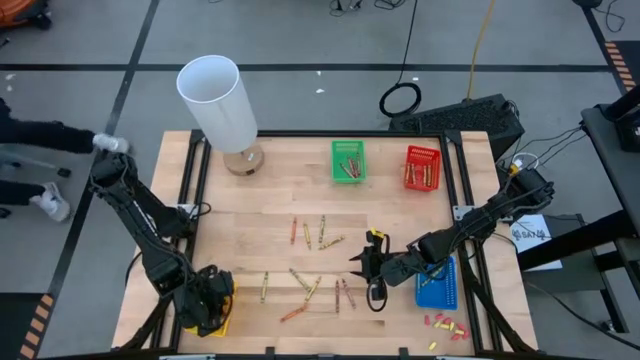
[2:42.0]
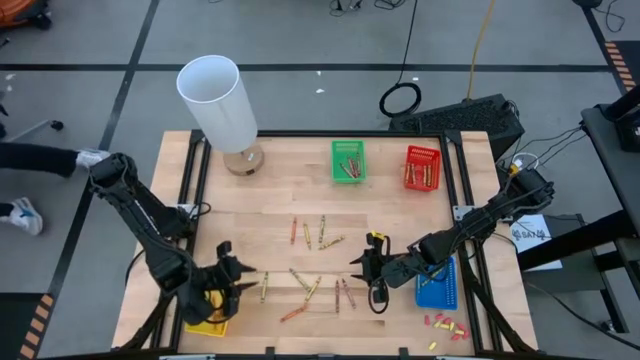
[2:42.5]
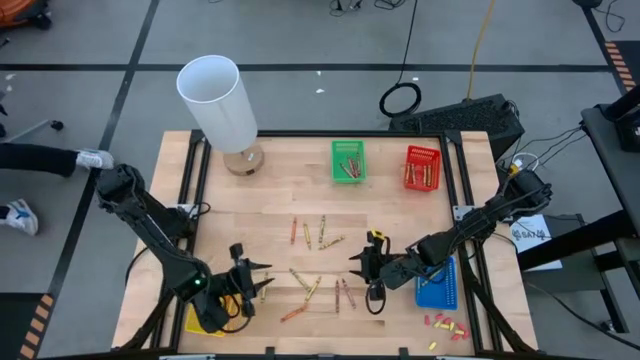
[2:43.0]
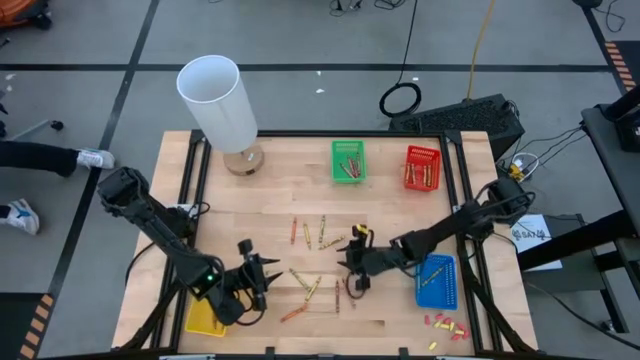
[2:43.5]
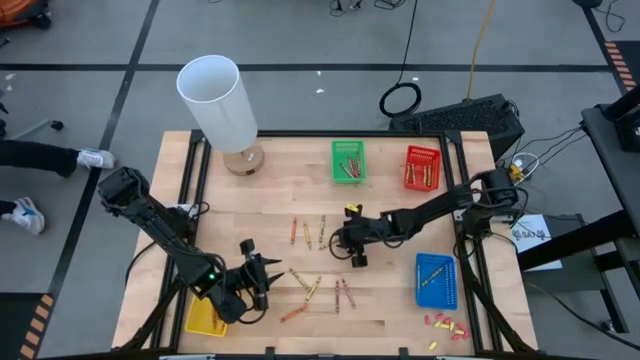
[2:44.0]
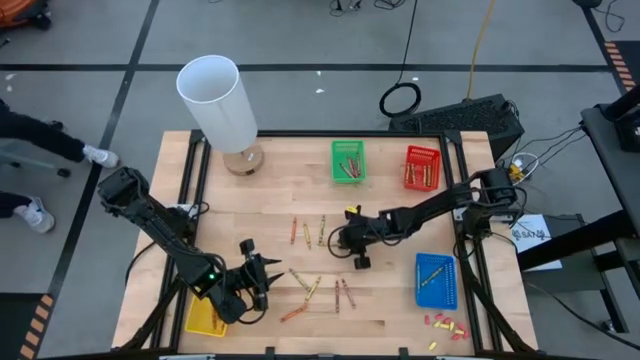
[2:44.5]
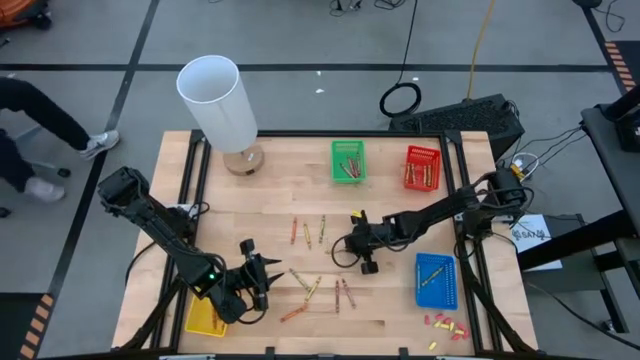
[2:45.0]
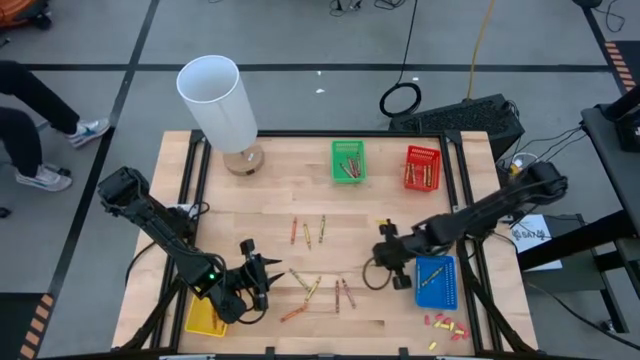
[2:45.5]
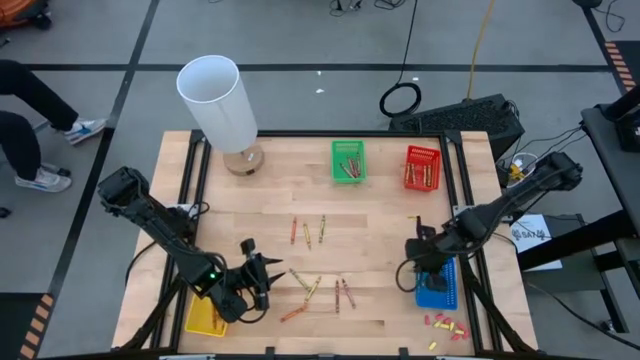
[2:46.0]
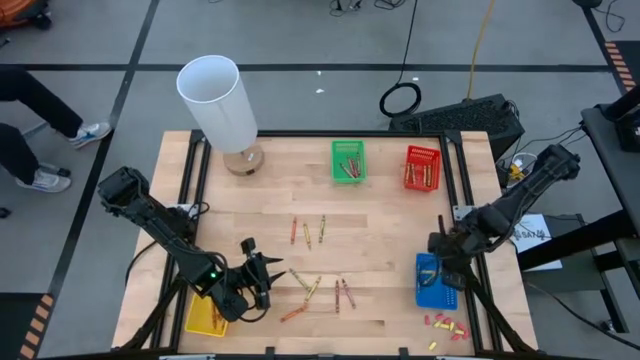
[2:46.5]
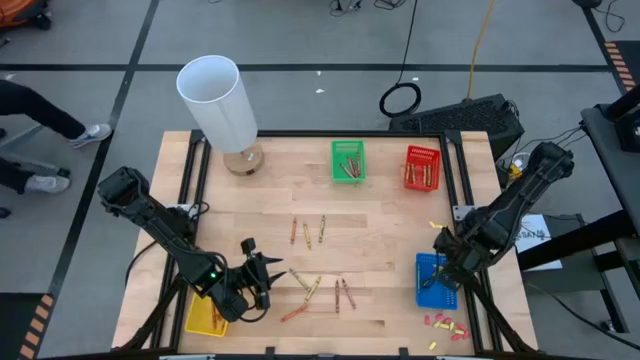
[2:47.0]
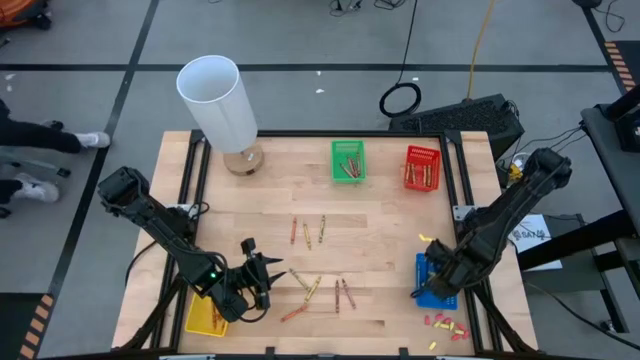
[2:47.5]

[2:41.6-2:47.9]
Task: Sort crayons
Put the yellow crayon into the blue bin

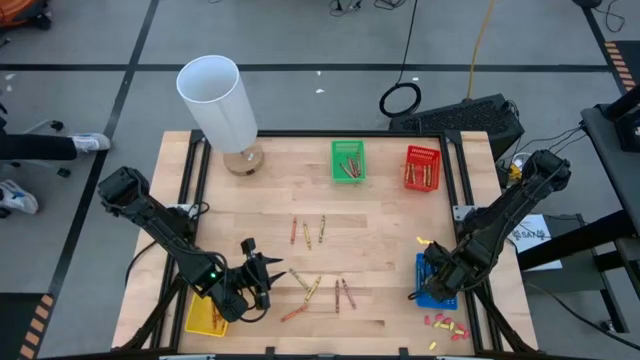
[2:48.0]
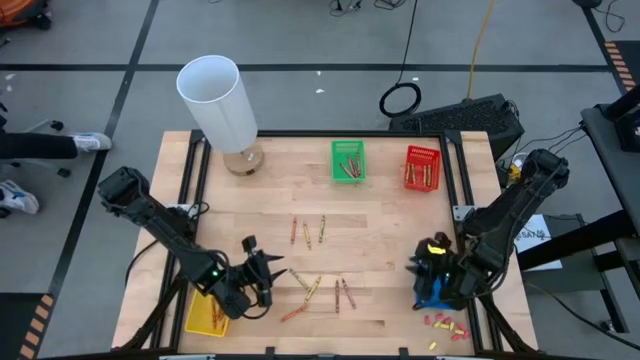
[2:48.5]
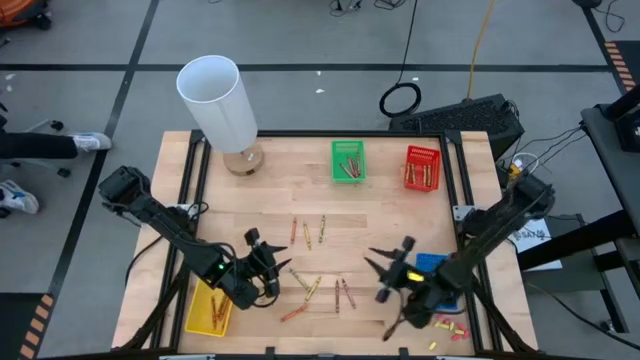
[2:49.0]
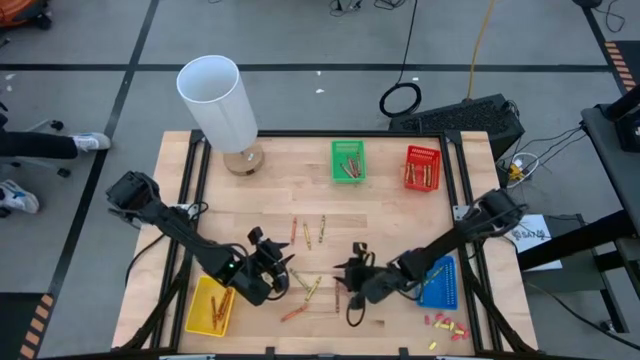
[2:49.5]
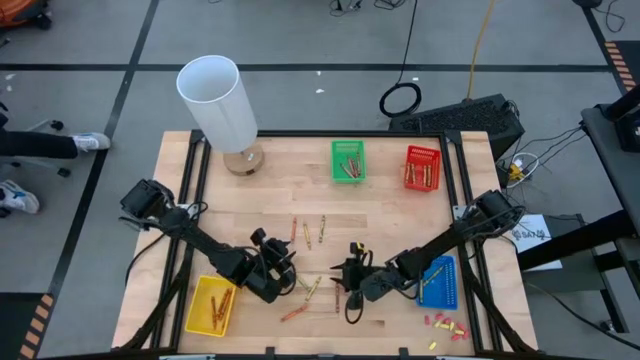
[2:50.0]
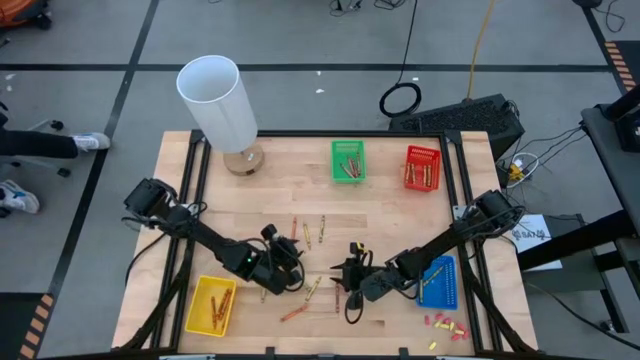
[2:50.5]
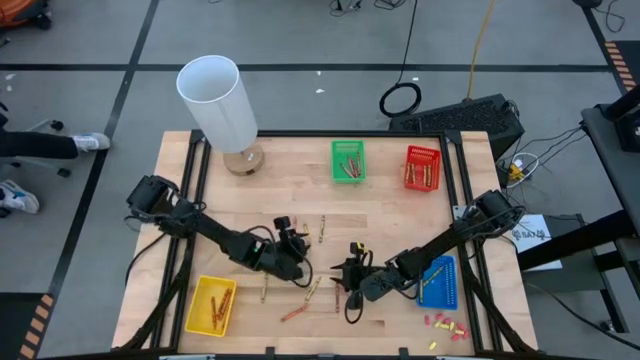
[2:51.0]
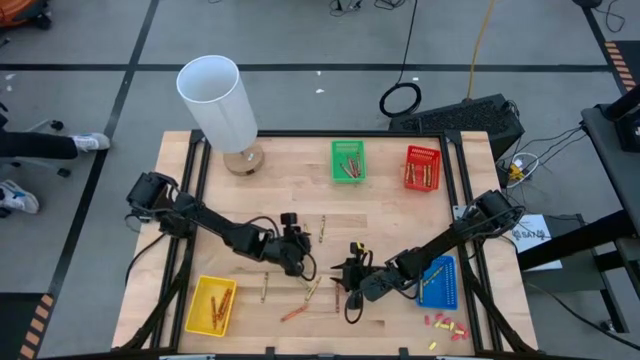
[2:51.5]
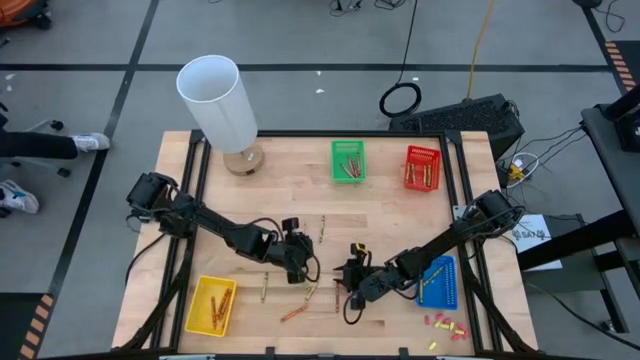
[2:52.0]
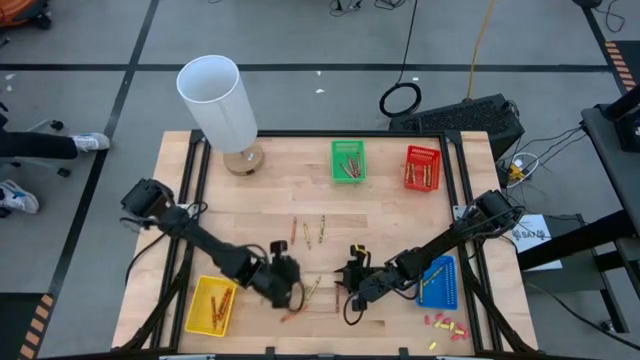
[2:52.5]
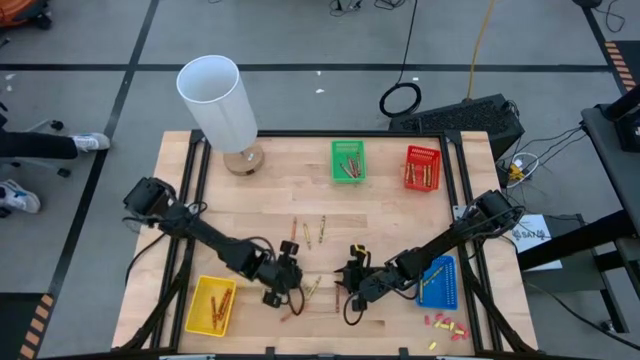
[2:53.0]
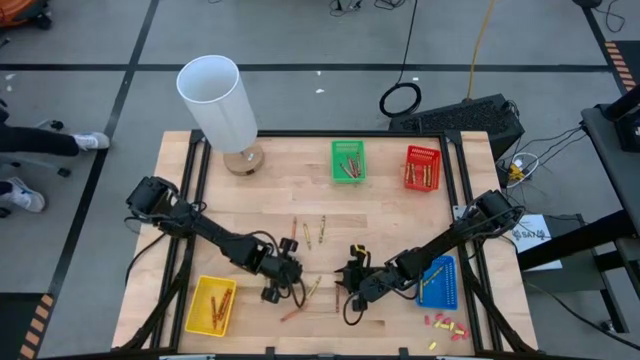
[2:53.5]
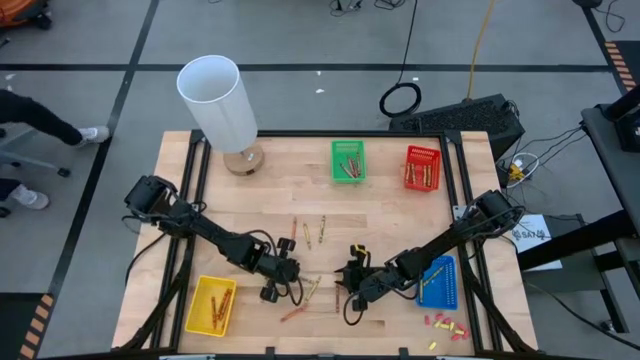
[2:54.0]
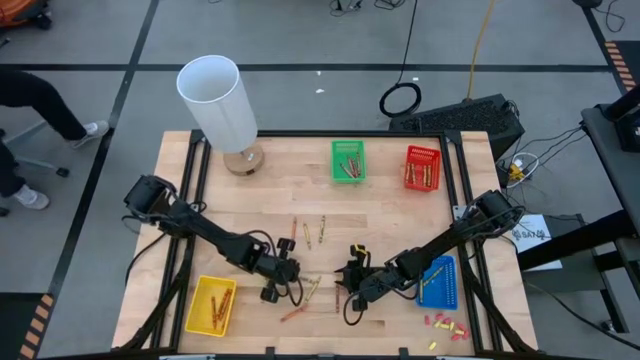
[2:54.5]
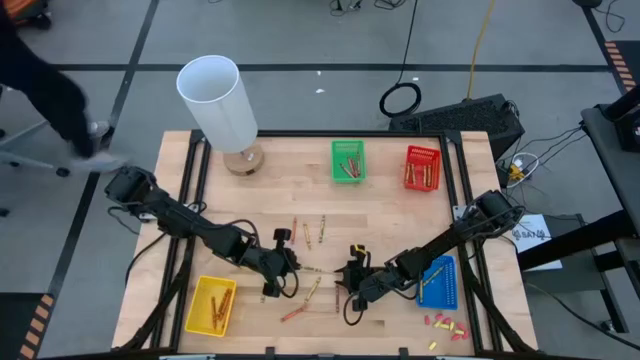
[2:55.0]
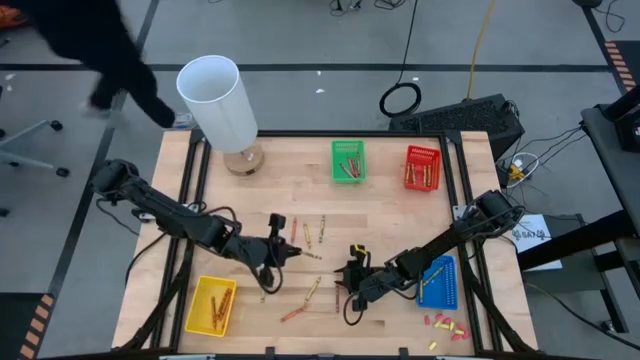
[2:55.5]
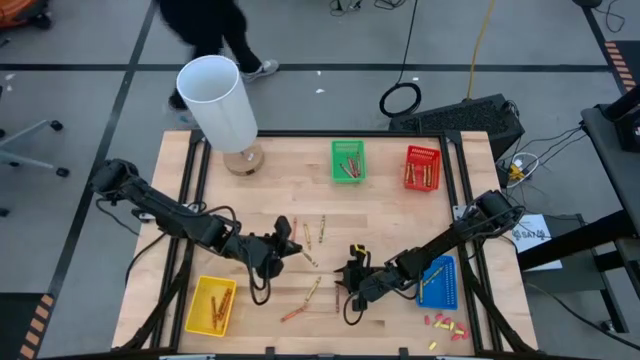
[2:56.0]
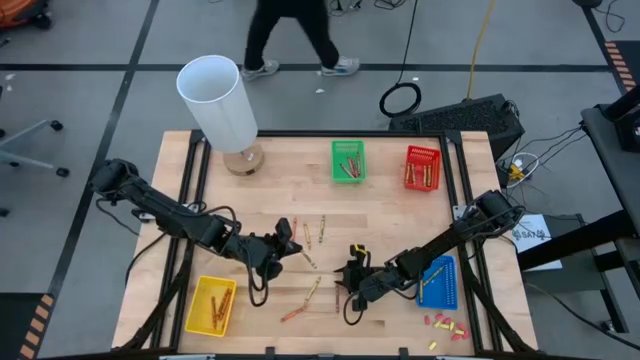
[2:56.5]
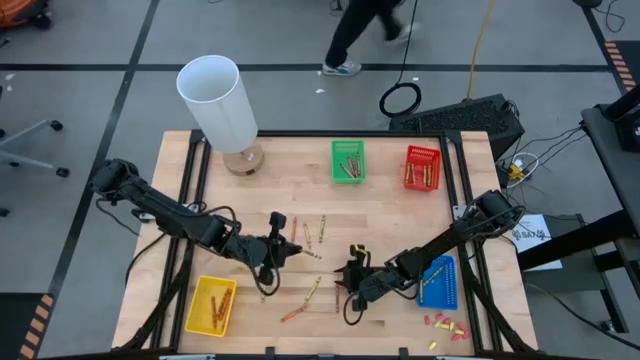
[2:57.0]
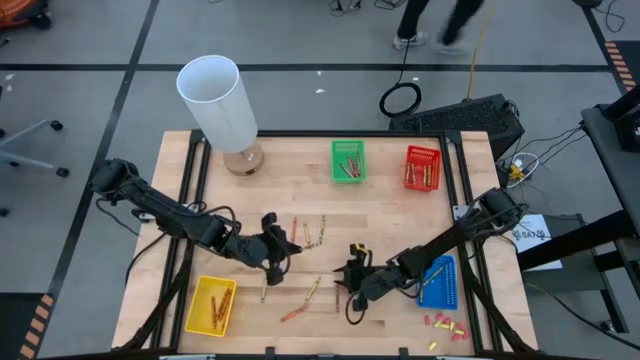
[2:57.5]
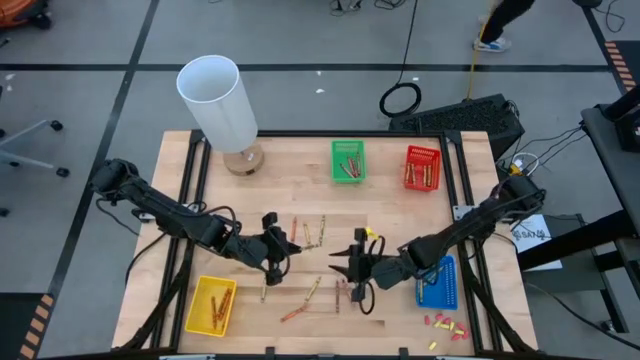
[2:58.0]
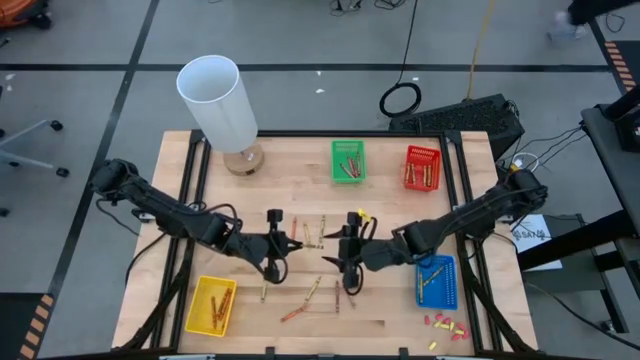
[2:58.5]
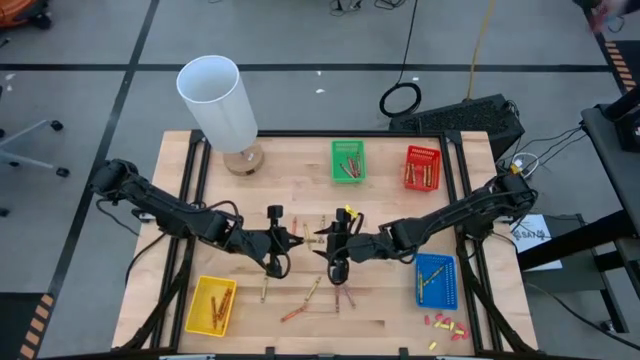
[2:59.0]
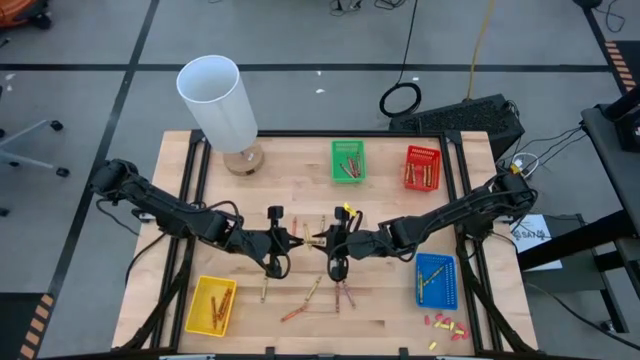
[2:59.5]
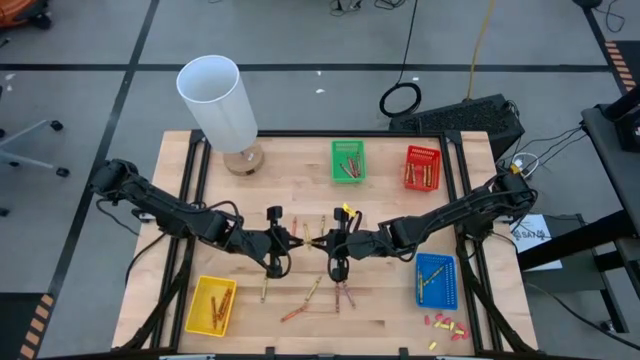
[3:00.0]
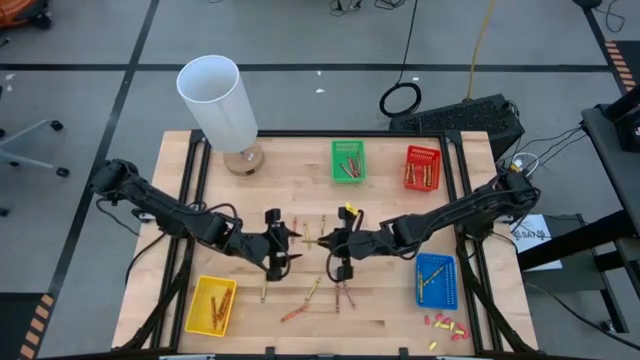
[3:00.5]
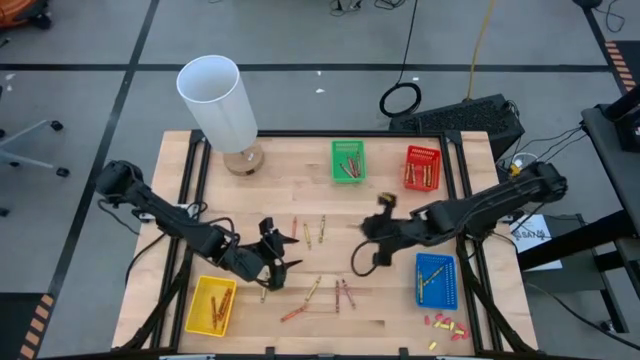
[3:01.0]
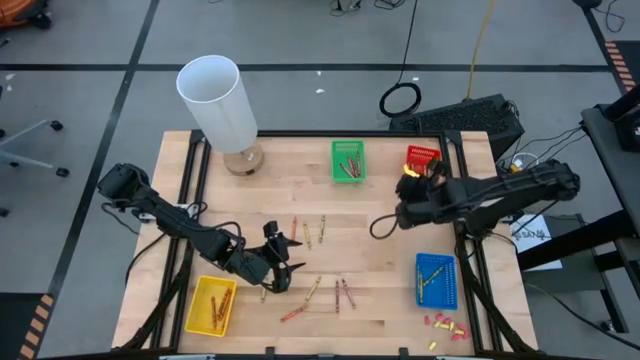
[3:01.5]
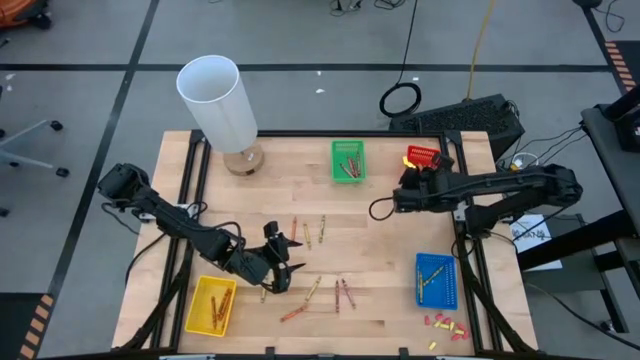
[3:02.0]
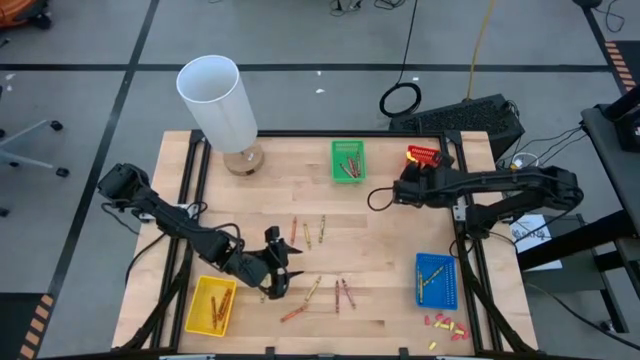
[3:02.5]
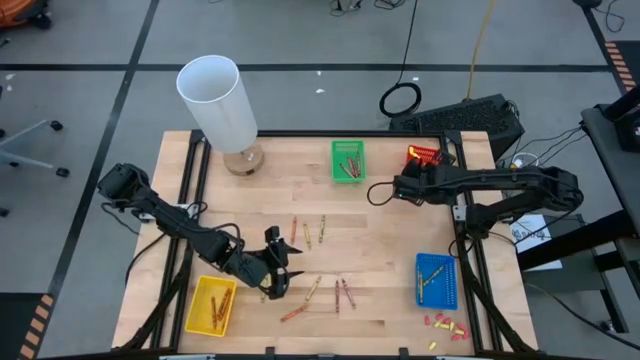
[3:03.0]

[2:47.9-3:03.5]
Put the green crayon into the red bin
